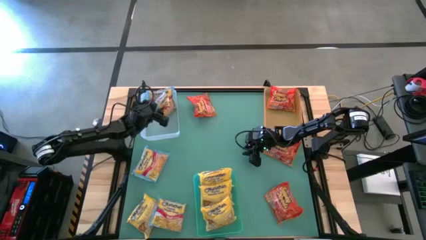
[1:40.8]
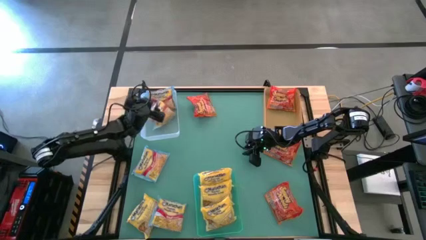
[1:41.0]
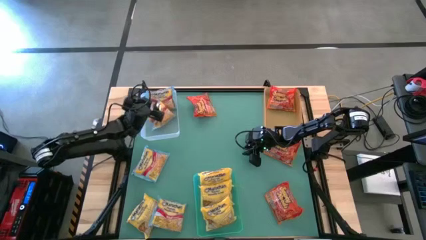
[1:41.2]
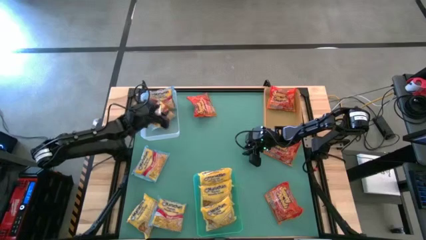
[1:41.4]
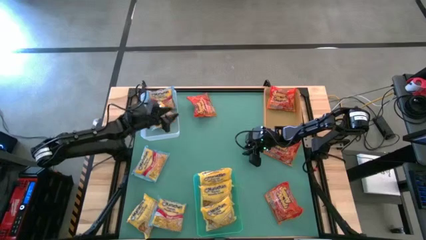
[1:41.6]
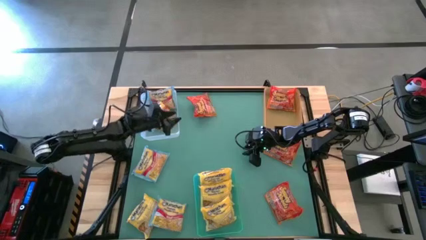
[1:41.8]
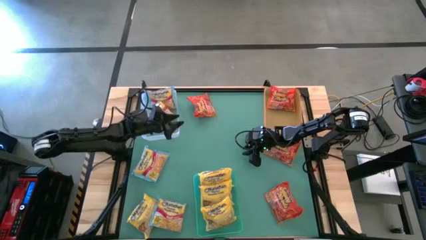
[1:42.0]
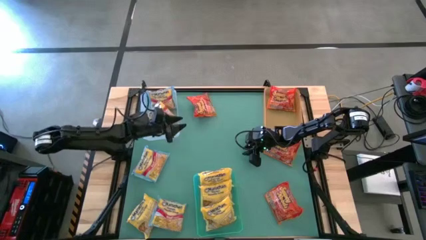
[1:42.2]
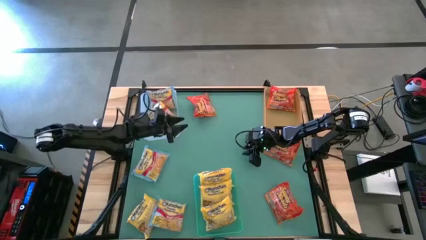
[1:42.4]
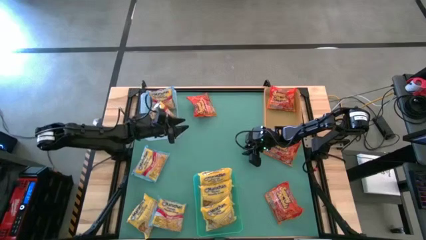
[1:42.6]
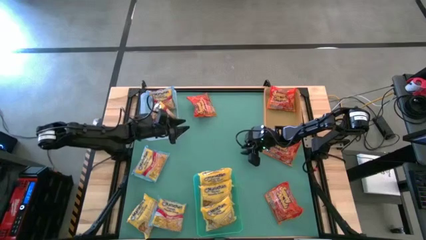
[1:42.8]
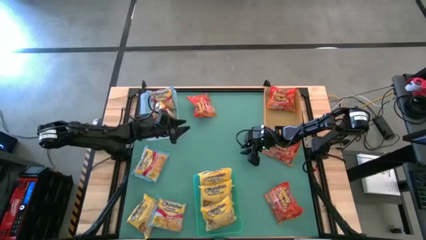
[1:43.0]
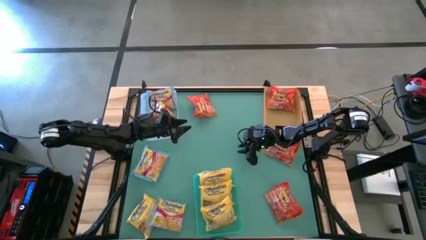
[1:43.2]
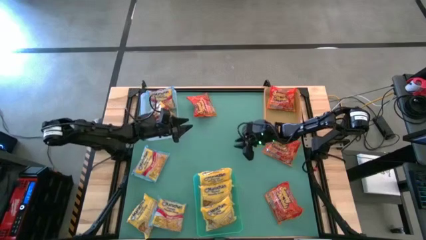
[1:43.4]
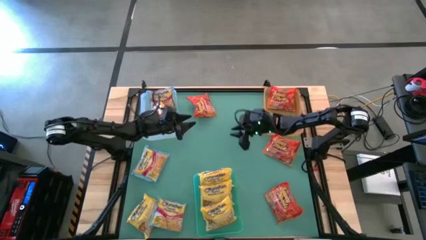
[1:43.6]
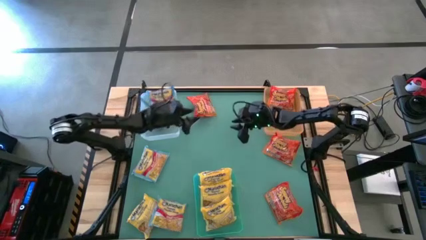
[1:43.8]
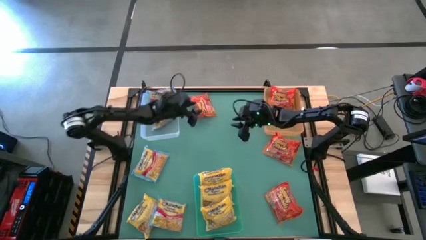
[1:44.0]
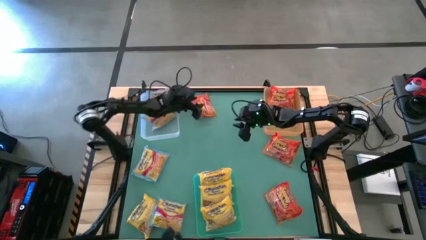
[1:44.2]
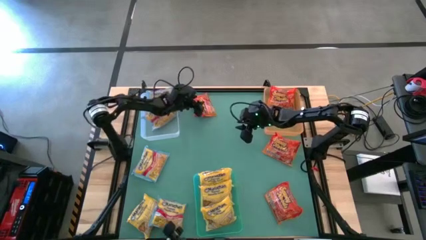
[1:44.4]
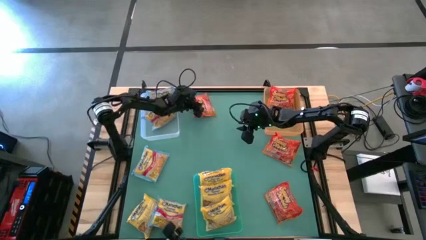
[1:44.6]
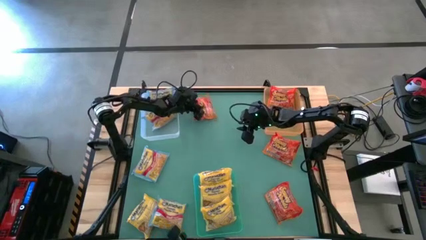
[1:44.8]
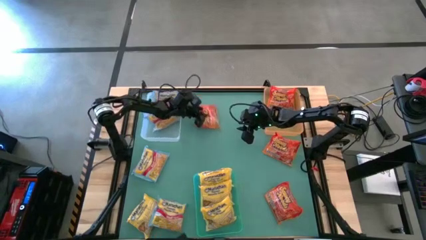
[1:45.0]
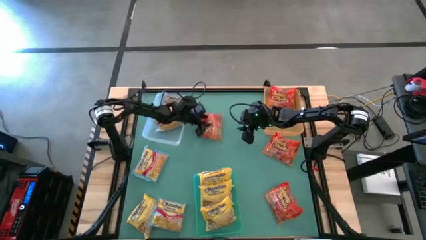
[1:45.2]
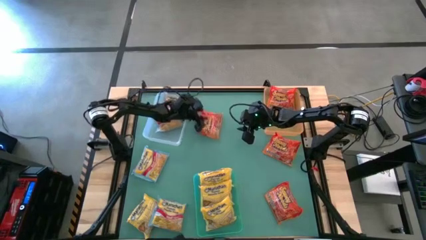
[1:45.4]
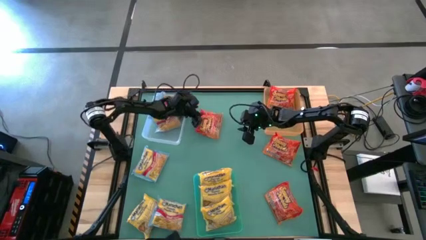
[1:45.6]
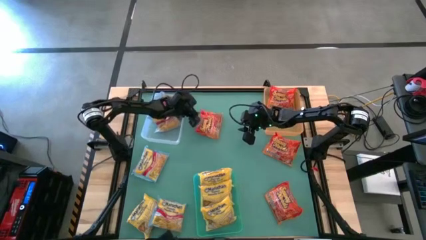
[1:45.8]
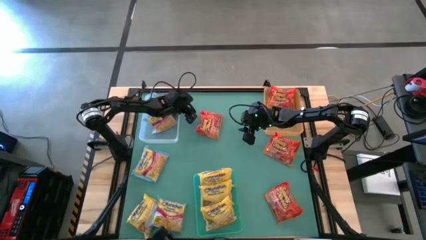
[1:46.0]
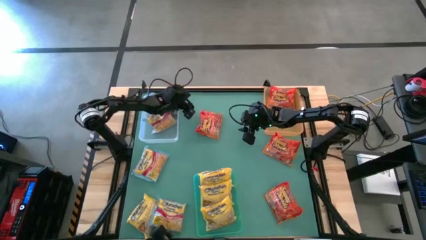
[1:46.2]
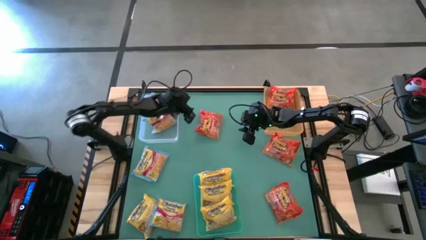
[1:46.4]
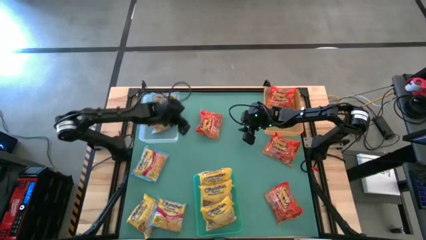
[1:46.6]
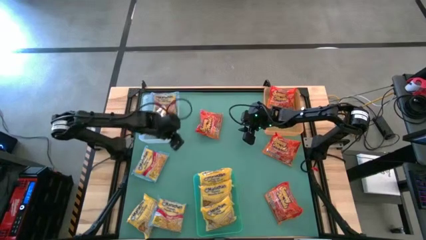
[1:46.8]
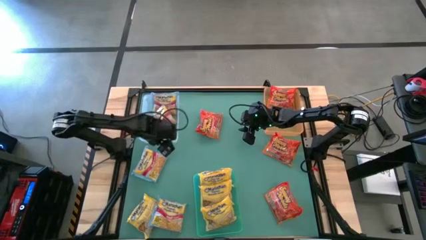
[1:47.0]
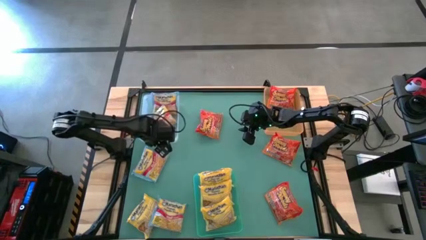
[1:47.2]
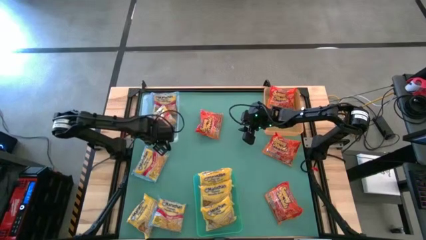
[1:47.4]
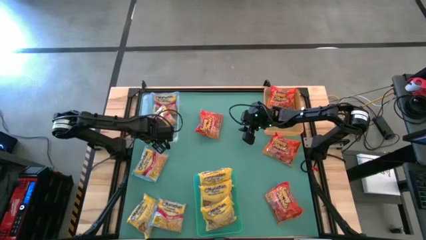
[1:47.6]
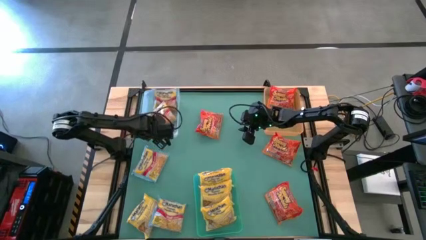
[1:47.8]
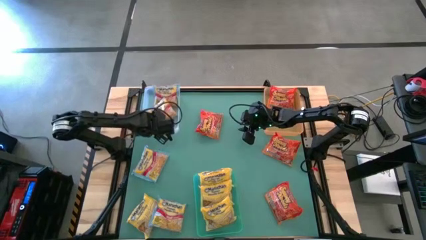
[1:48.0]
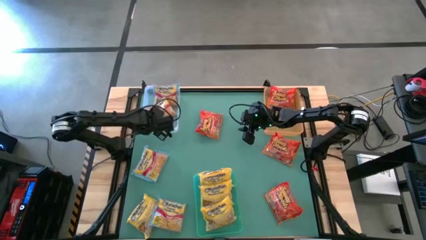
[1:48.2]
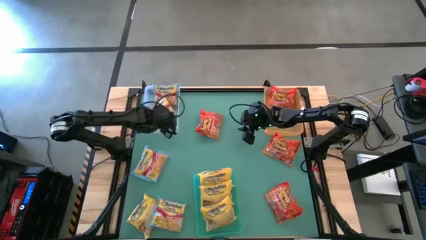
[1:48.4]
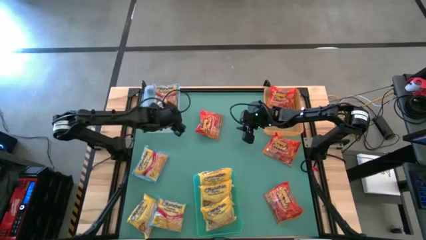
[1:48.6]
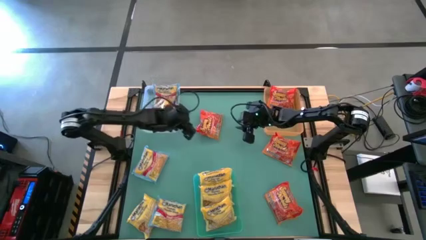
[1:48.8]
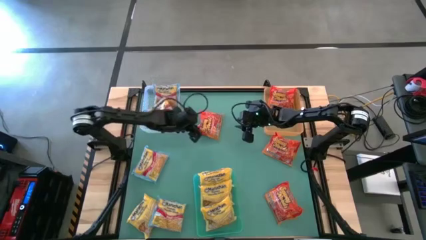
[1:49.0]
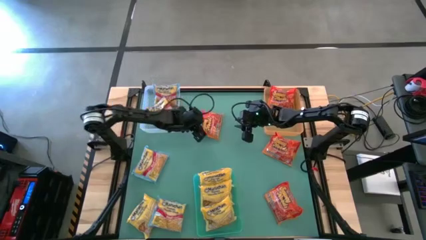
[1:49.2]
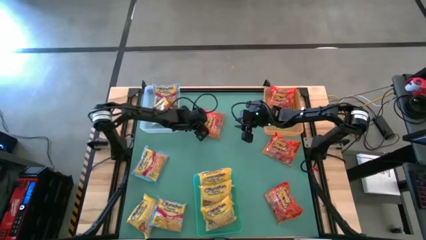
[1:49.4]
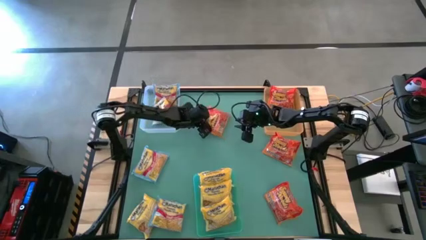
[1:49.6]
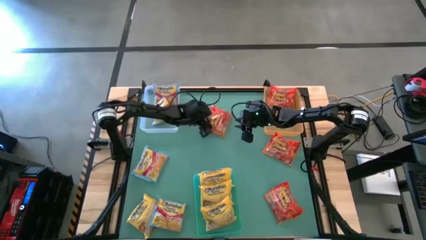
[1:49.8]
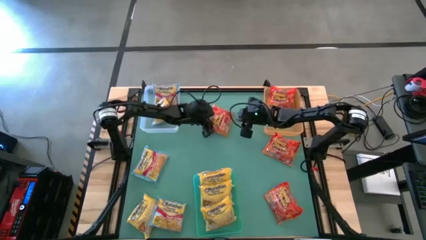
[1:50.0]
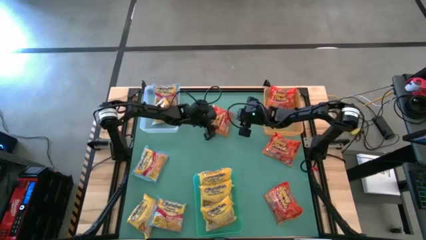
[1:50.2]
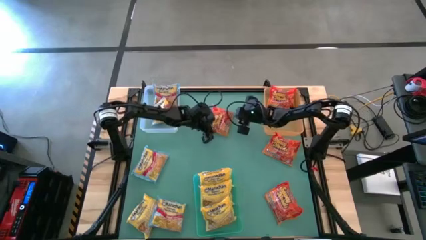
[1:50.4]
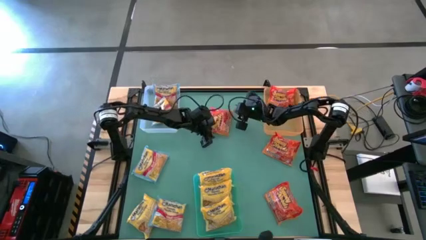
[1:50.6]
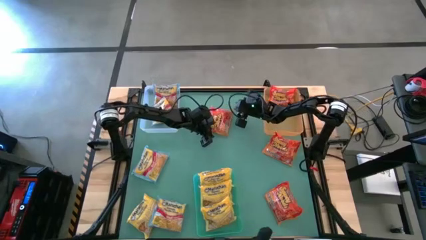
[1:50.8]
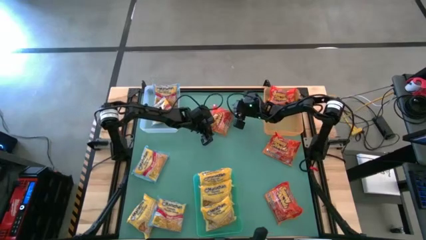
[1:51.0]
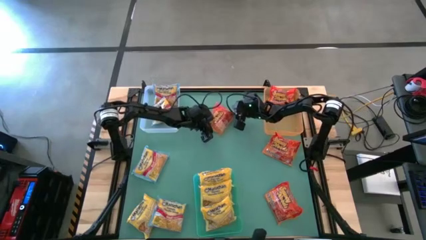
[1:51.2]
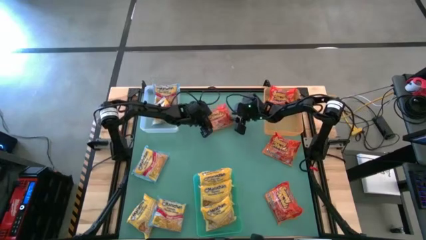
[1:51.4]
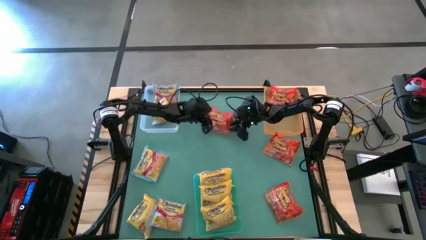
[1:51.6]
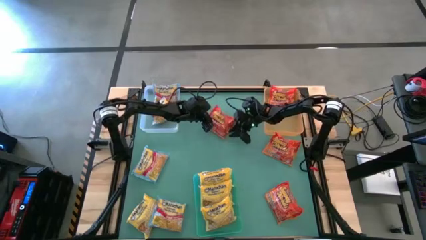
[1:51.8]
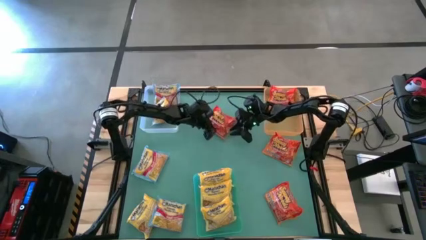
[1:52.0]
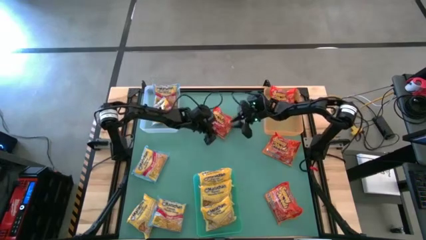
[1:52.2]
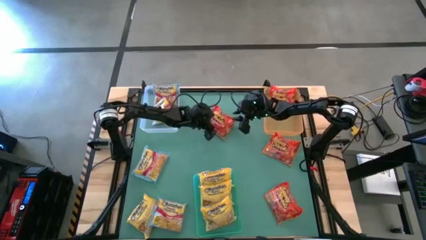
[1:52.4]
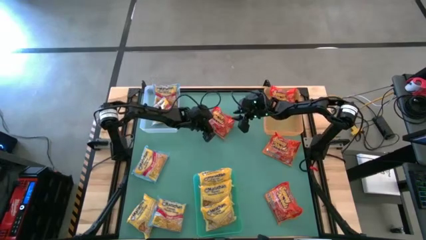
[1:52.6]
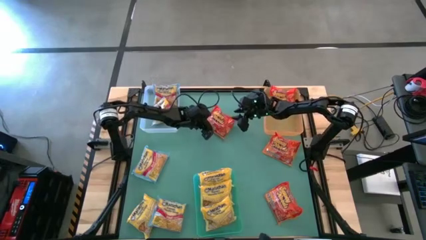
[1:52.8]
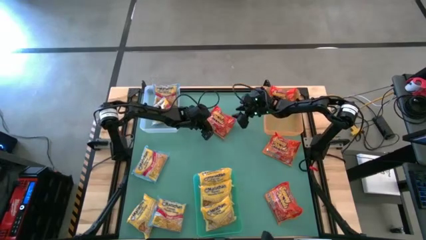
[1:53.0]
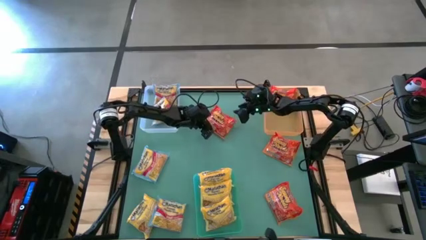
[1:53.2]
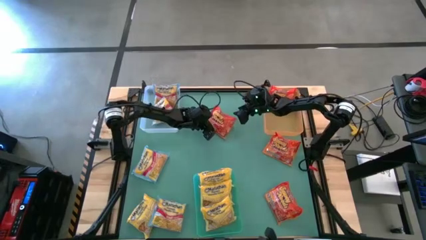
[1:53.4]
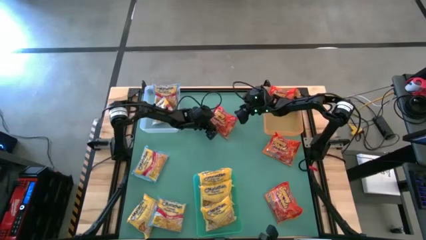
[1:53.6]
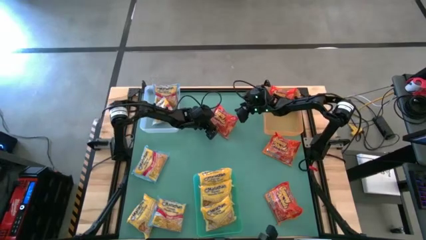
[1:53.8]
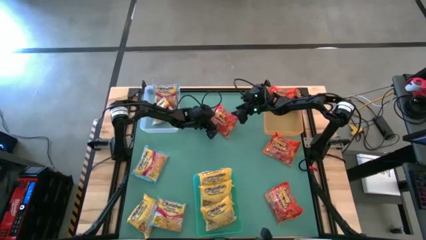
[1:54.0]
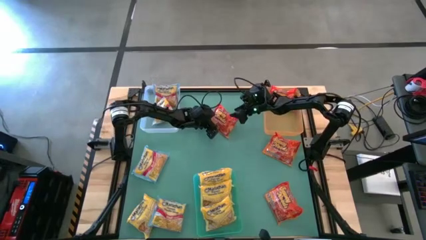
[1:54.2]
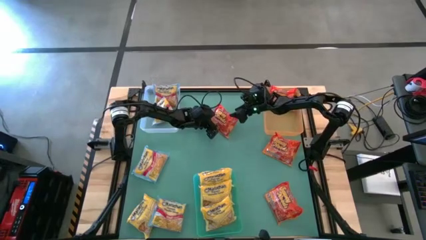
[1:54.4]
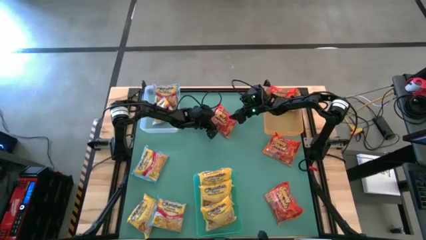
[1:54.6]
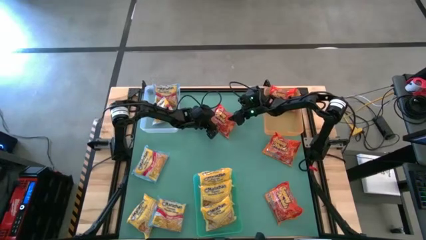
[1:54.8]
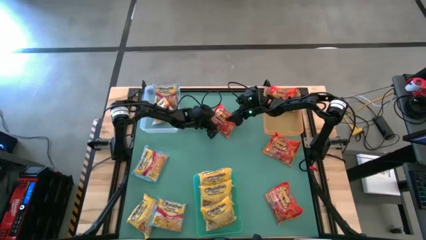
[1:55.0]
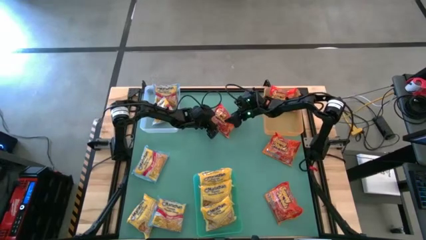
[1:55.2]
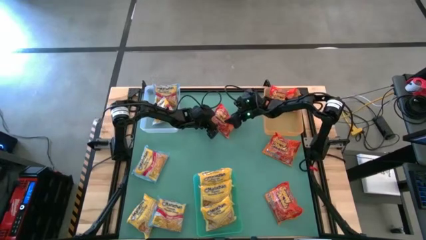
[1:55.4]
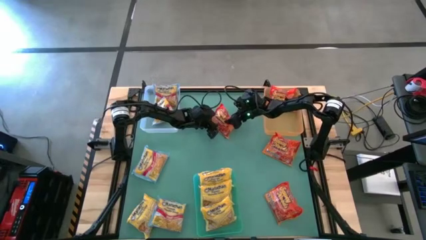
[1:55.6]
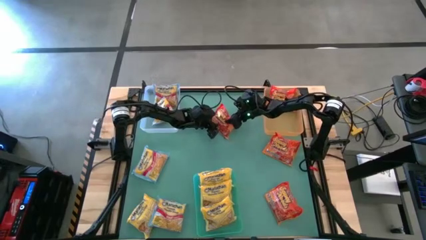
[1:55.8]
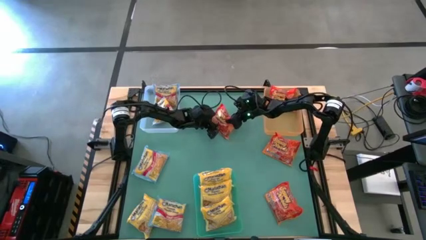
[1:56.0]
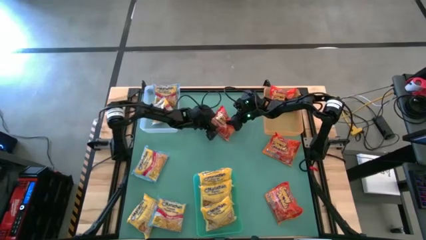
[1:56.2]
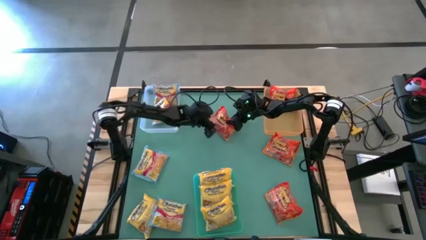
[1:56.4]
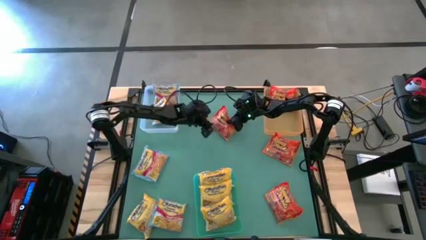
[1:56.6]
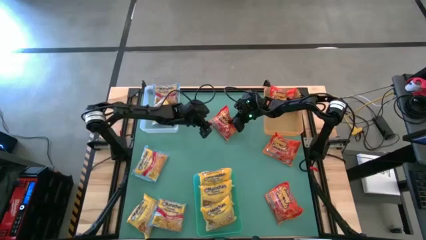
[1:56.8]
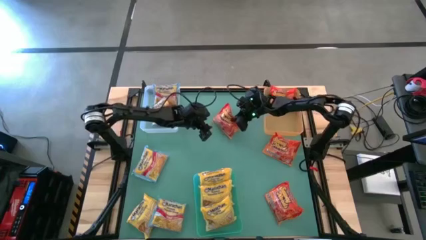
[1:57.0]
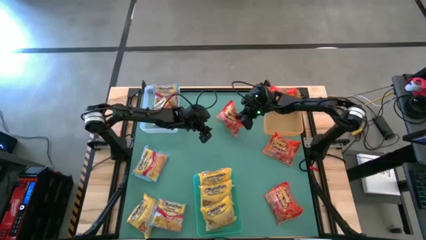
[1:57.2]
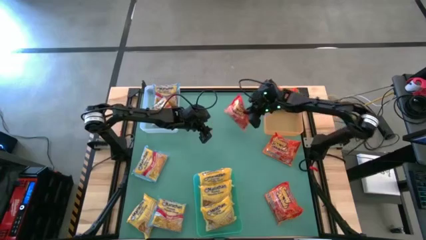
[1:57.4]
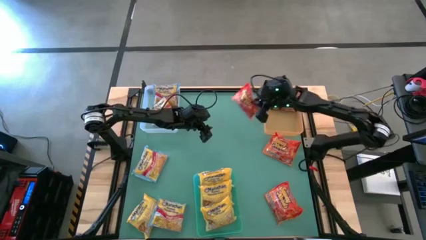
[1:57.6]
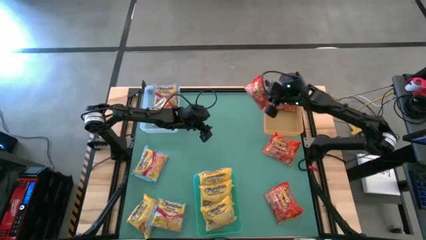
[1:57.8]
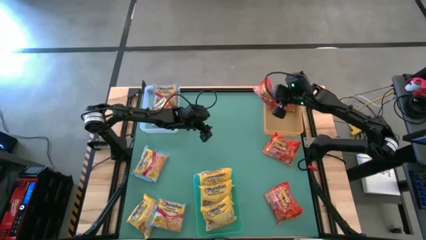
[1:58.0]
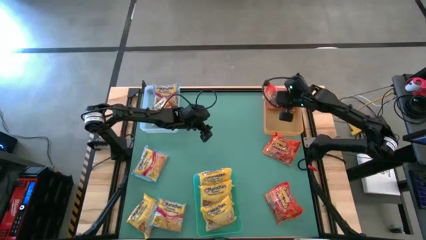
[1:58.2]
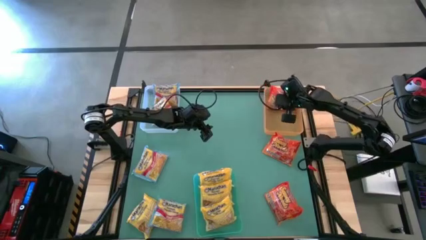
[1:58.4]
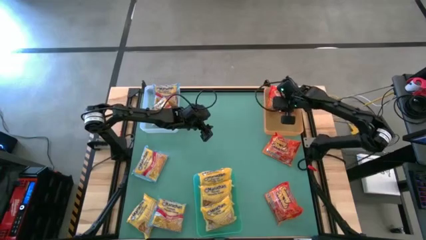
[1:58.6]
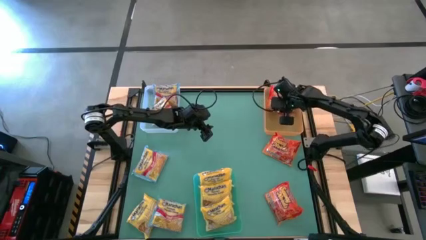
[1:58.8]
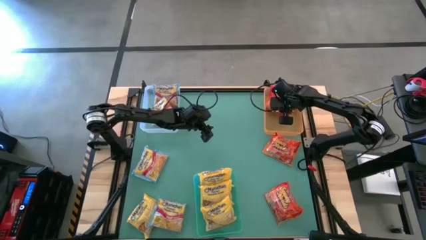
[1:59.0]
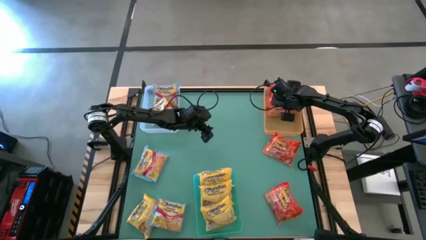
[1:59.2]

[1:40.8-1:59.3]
Task: Sort Maruchan noodles
Put the top red noodle pack into the orange bin
